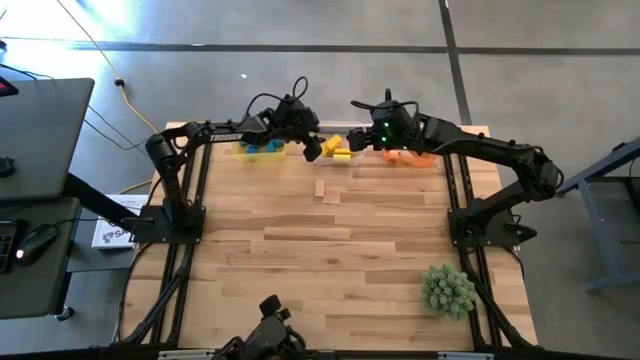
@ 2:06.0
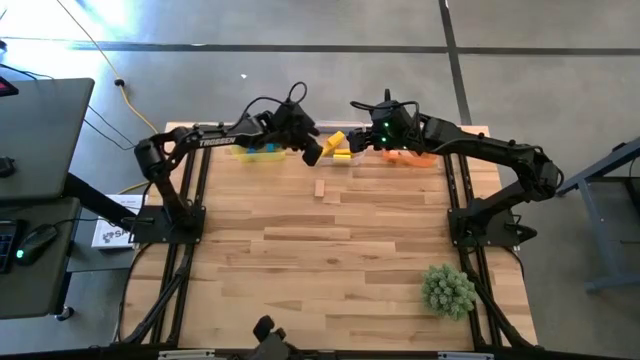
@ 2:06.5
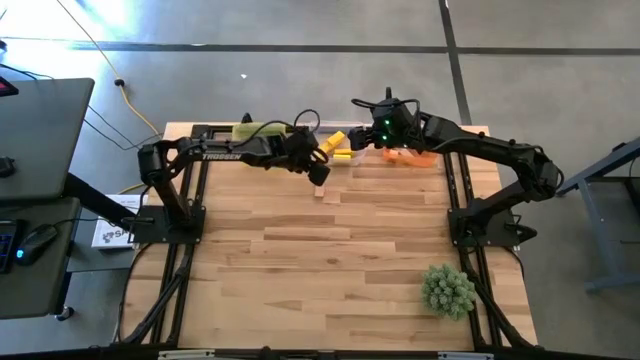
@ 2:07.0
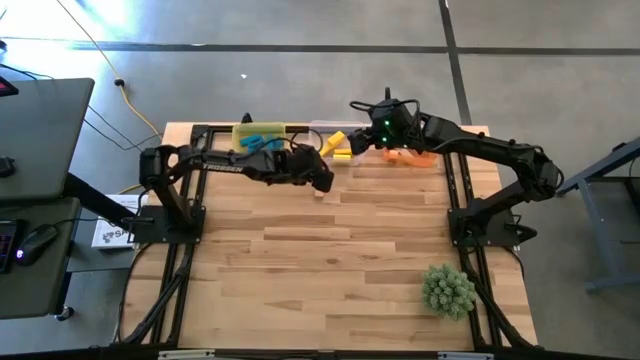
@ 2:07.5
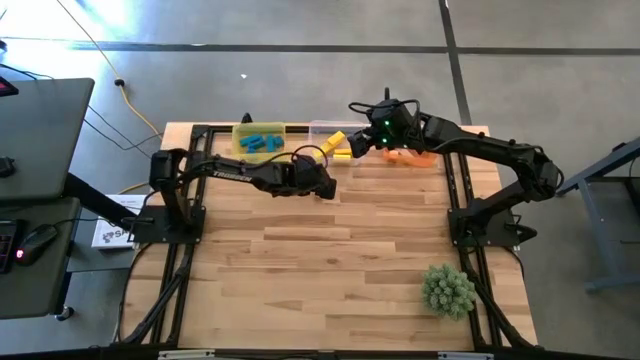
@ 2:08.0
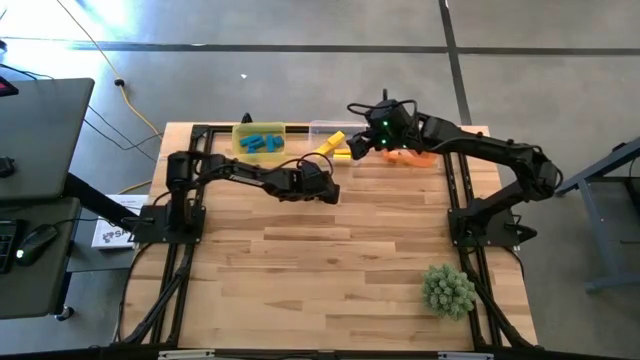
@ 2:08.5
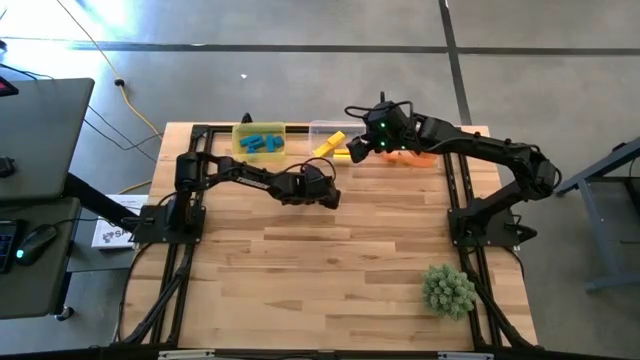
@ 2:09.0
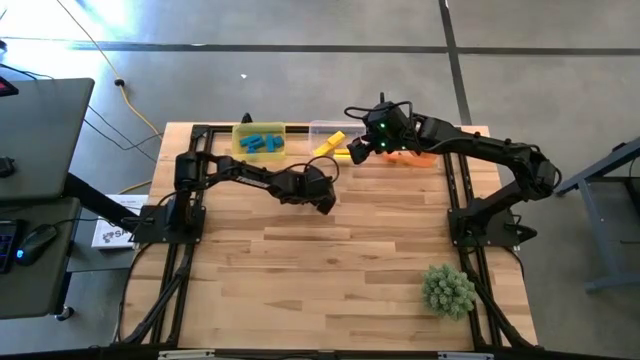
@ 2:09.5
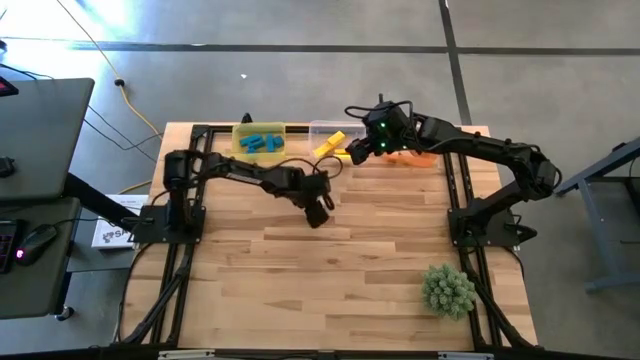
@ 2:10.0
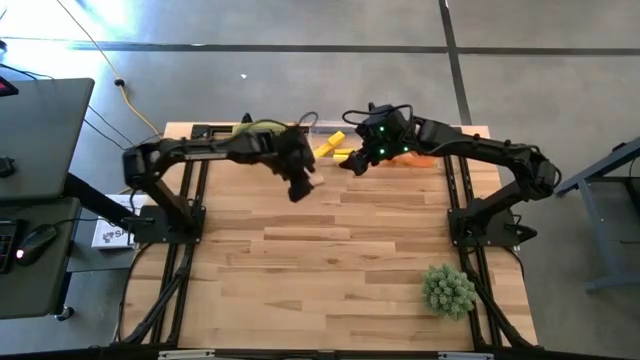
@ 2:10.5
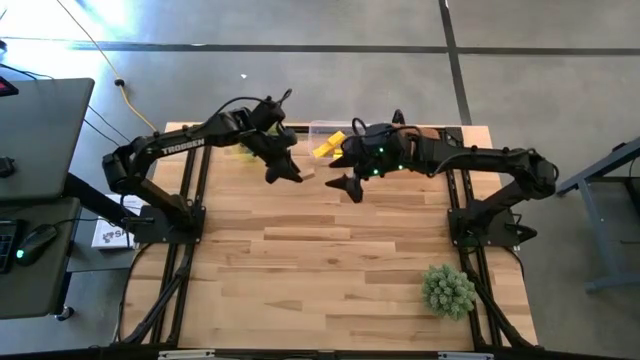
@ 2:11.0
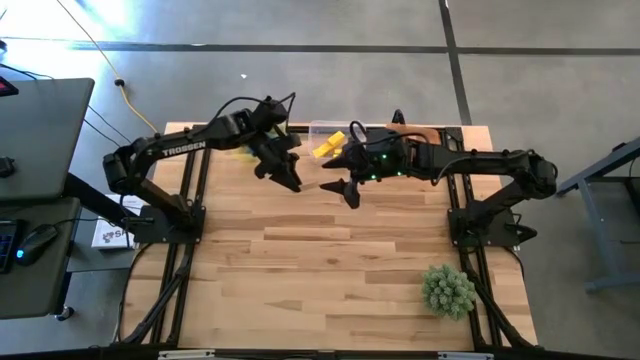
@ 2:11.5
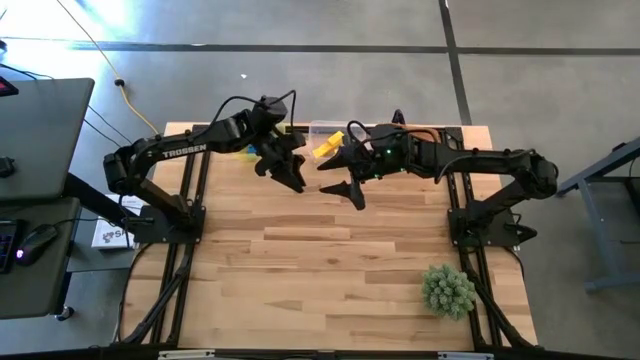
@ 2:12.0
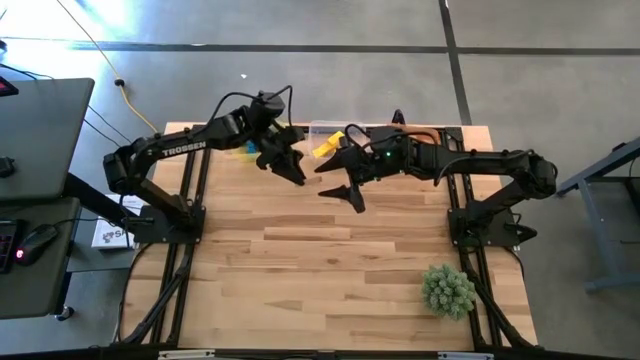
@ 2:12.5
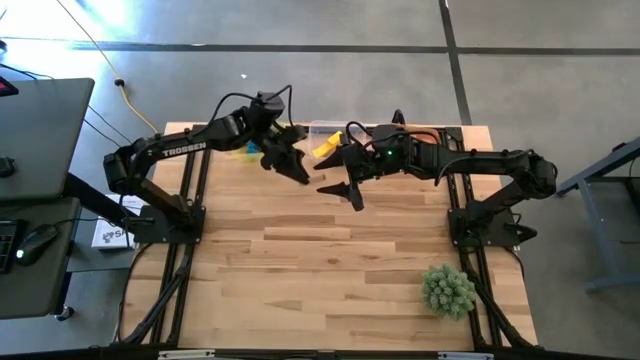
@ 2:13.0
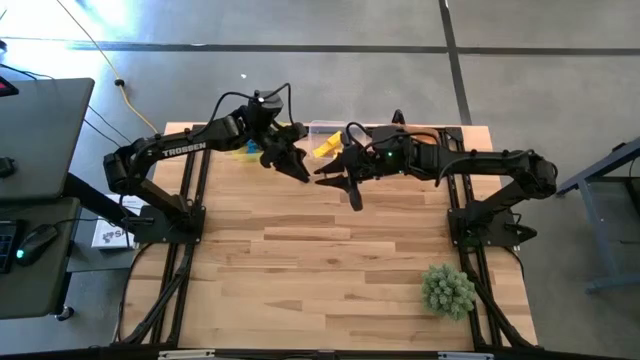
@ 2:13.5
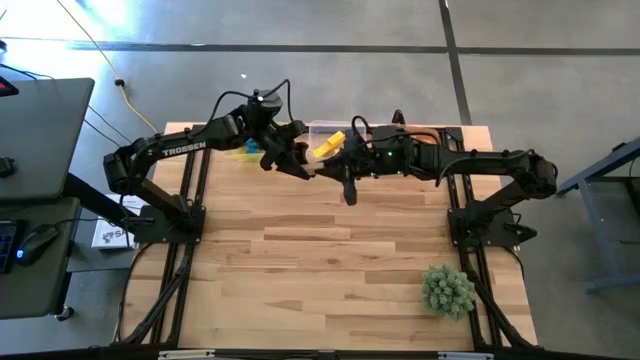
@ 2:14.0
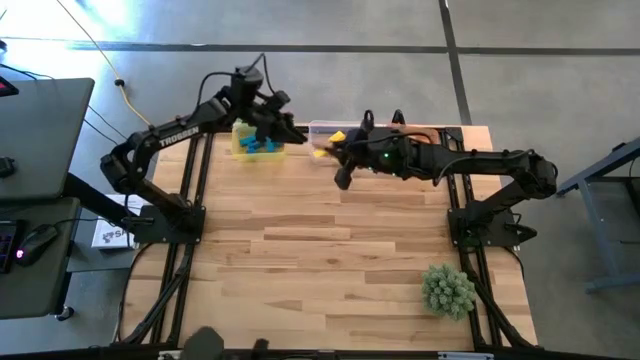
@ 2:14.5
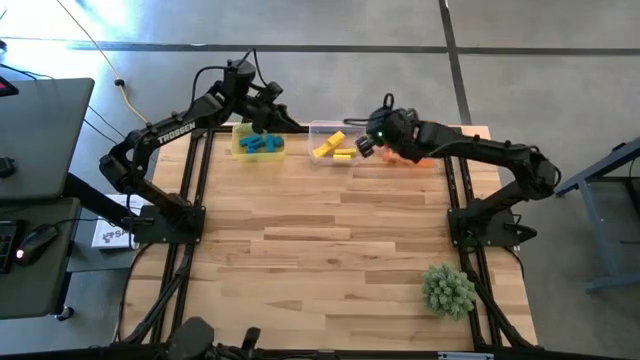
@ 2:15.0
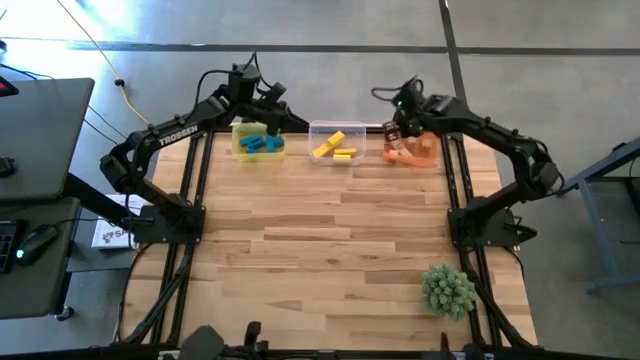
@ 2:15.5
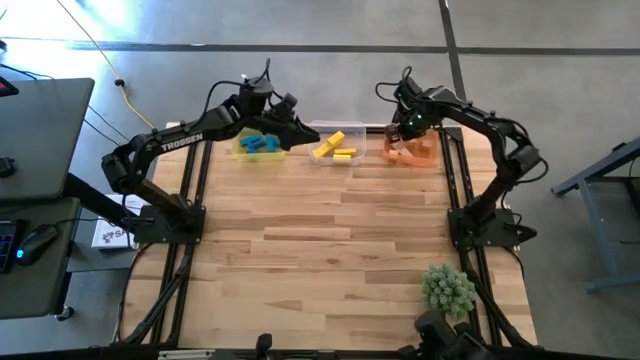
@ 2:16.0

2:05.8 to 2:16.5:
Task: Sort & place blocks by color
Put the brown block into the orange bin

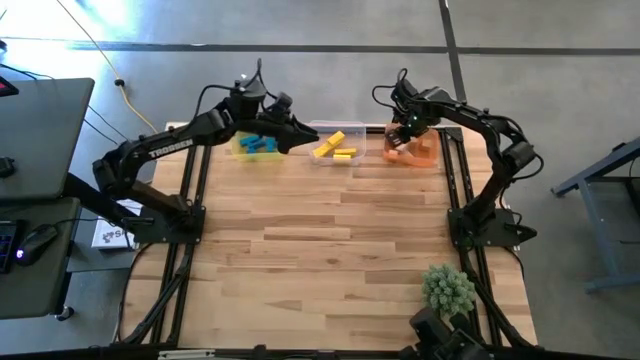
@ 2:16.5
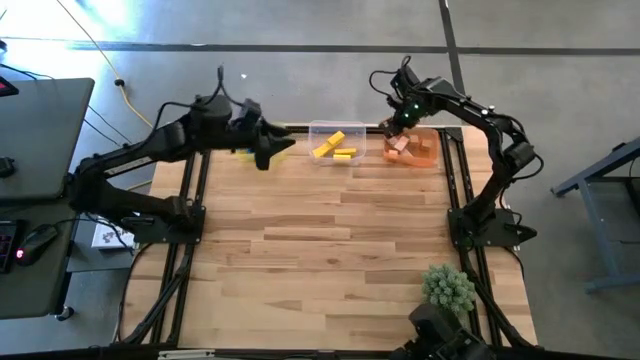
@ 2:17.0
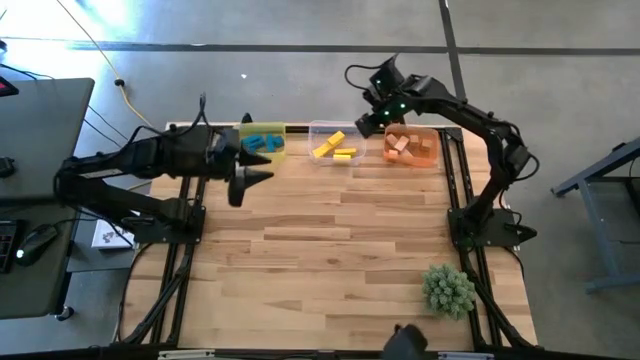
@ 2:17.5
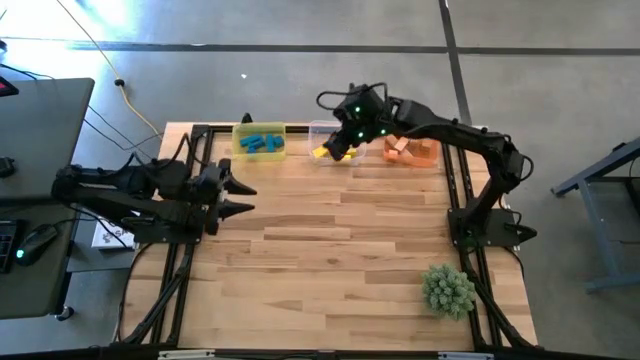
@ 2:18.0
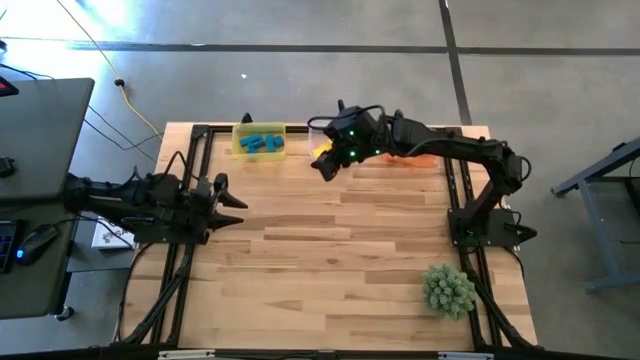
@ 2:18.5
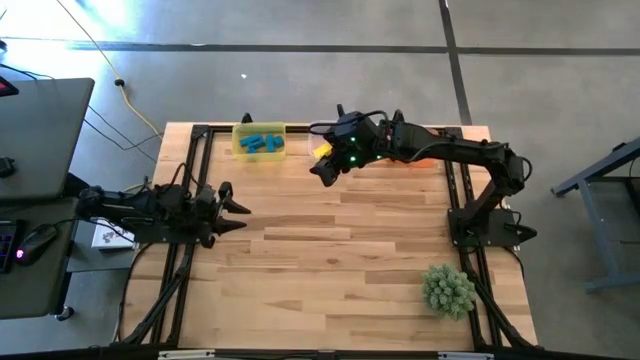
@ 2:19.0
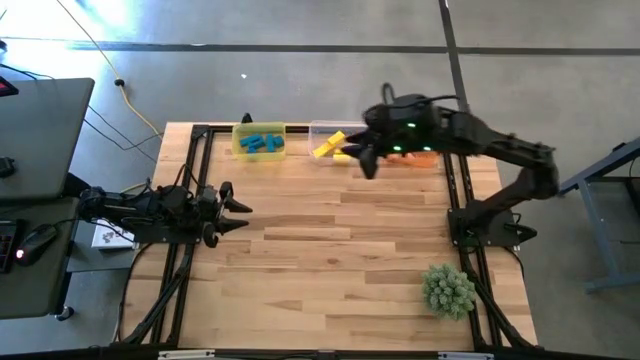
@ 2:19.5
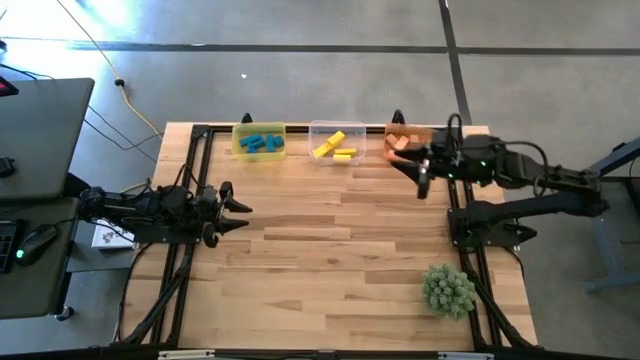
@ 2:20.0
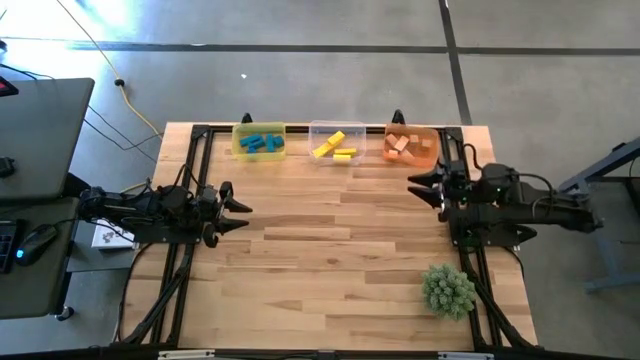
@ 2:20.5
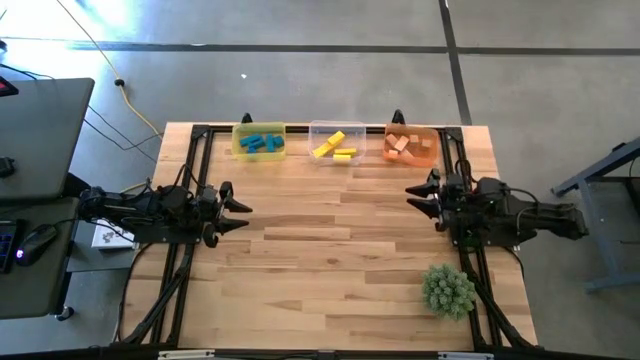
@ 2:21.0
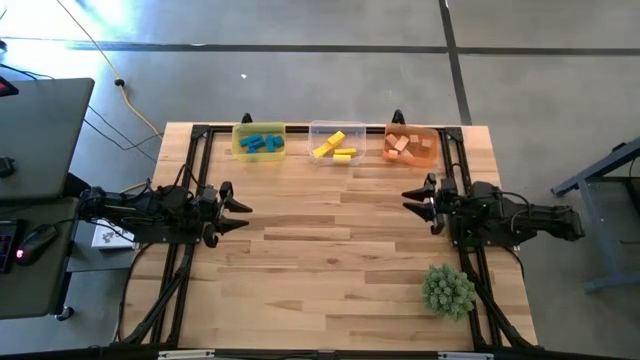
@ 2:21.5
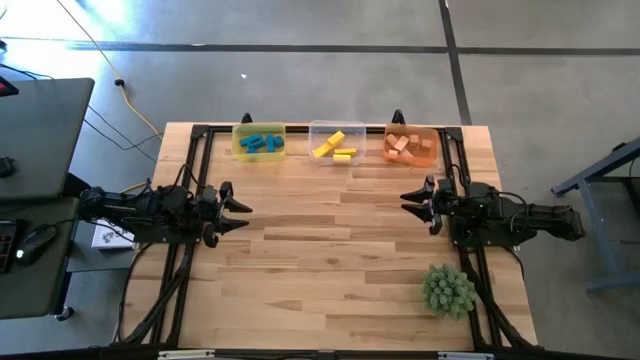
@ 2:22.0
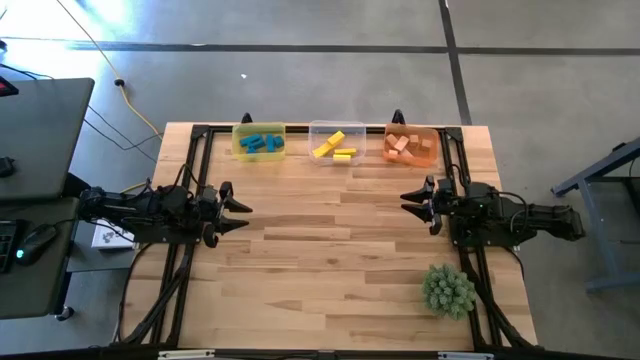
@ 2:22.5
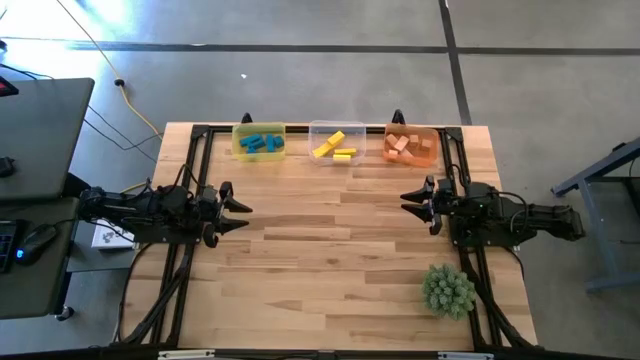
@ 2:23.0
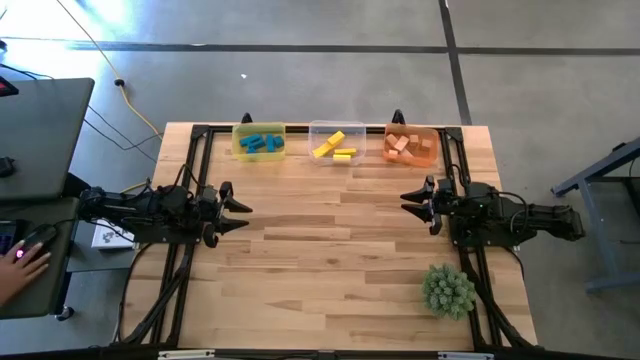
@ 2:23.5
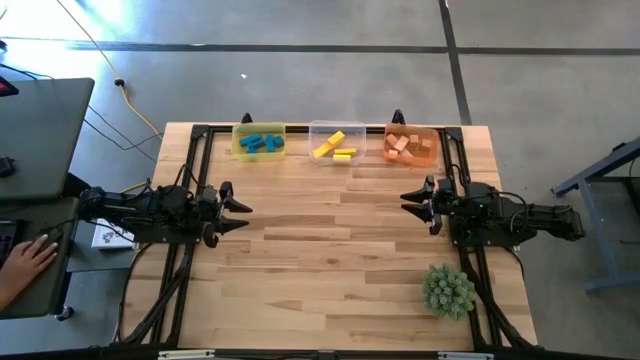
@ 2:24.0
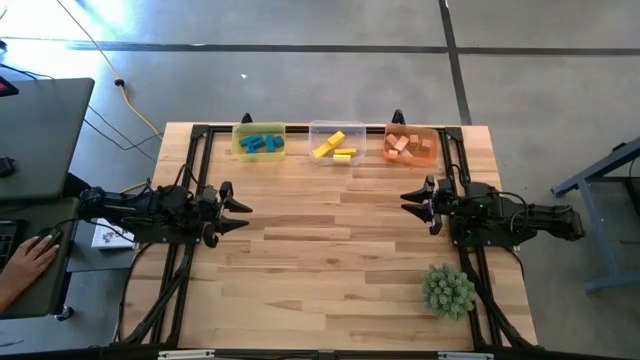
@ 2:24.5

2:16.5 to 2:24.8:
Return to Home Position

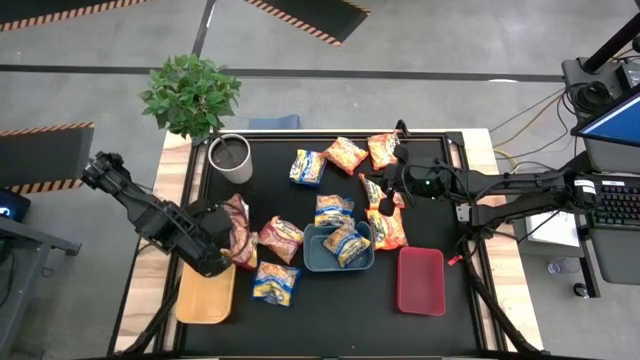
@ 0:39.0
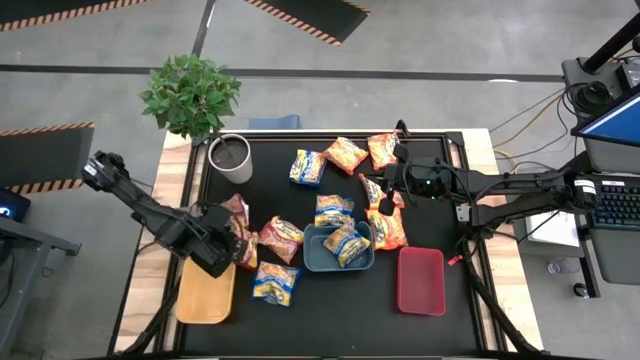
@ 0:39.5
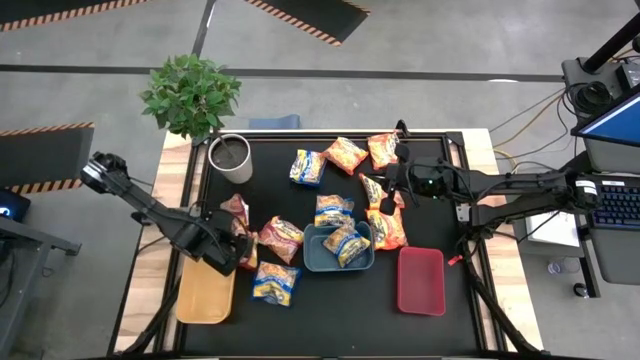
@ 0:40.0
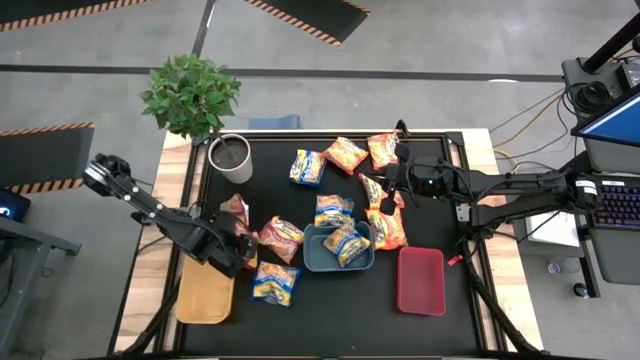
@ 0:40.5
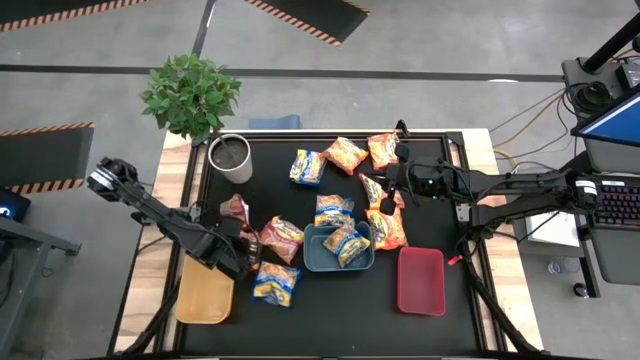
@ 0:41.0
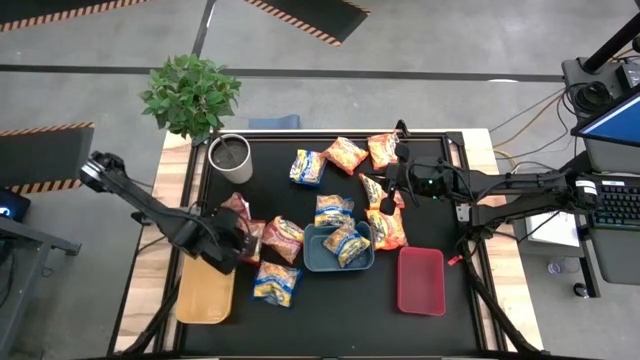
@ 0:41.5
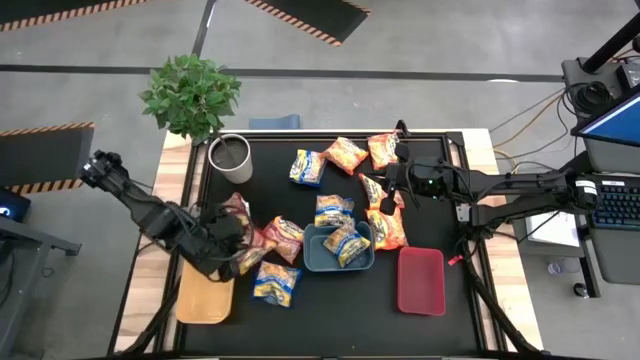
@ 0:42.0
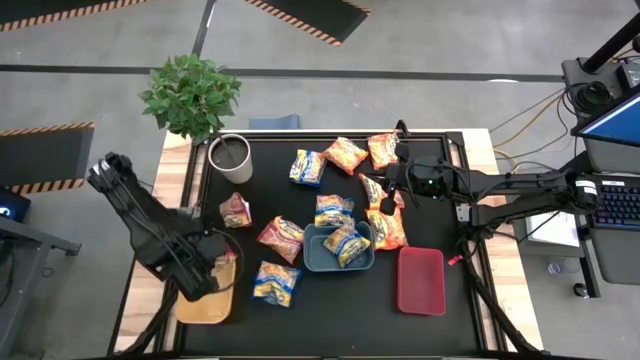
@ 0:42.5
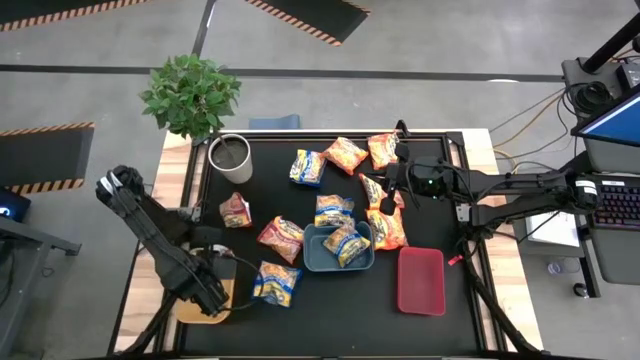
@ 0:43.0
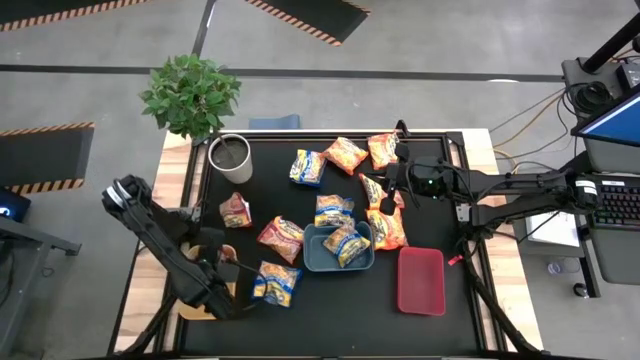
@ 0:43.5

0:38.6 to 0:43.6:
Task: Sort Maruchan noodles
Put the top red noodle pack into the yellow bin
